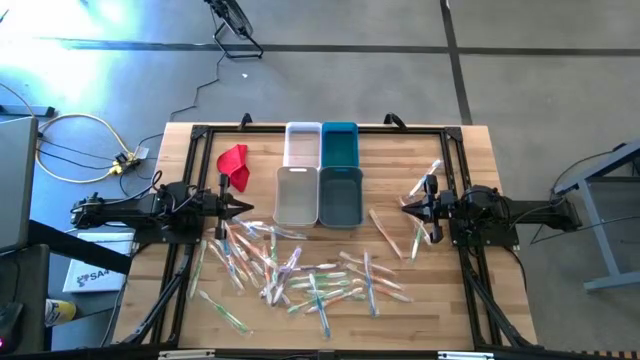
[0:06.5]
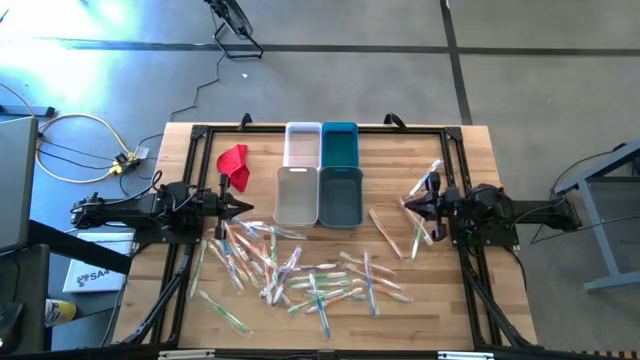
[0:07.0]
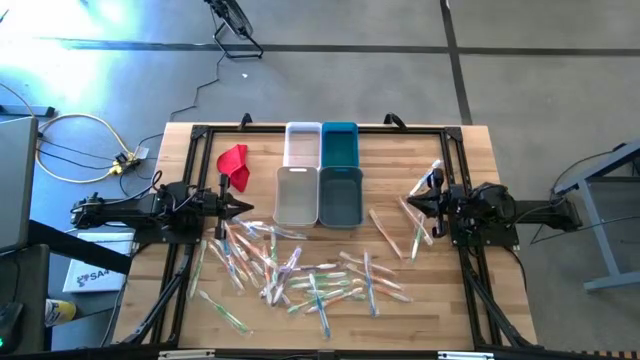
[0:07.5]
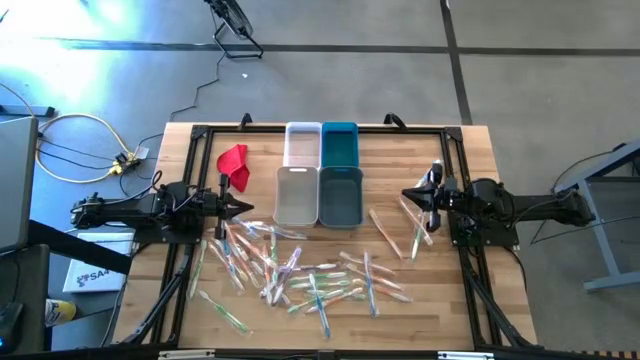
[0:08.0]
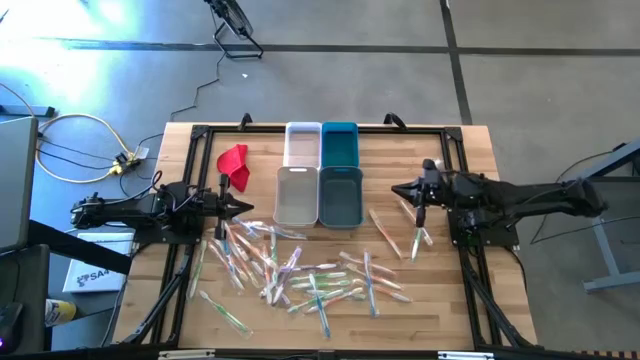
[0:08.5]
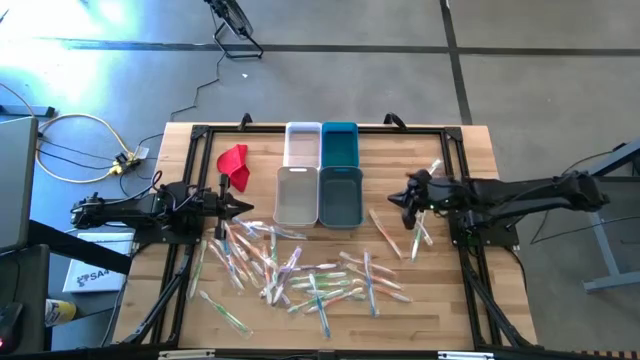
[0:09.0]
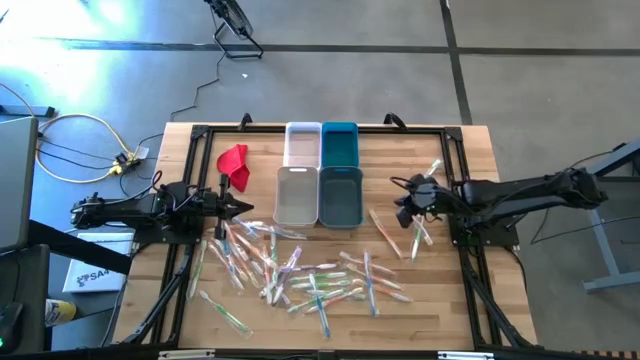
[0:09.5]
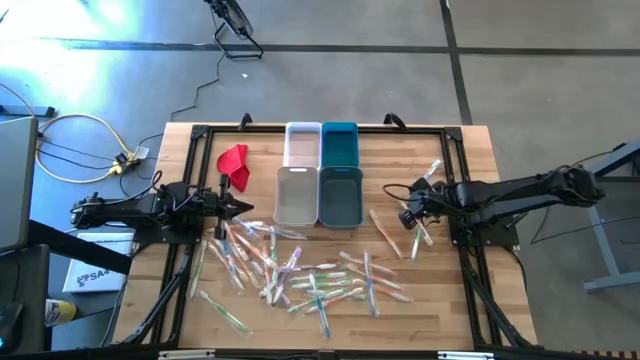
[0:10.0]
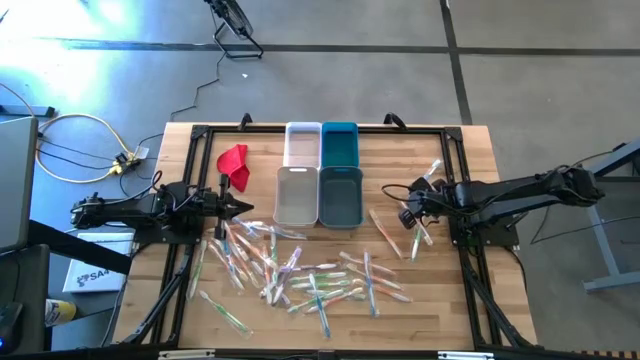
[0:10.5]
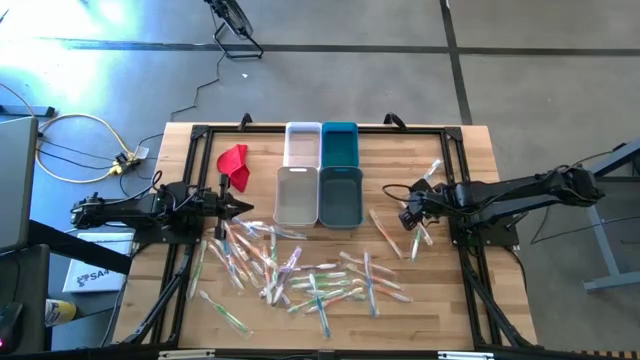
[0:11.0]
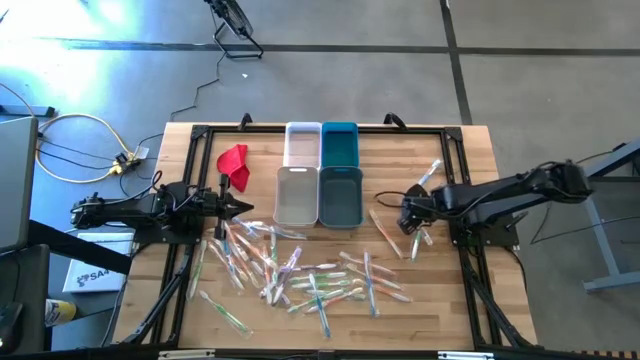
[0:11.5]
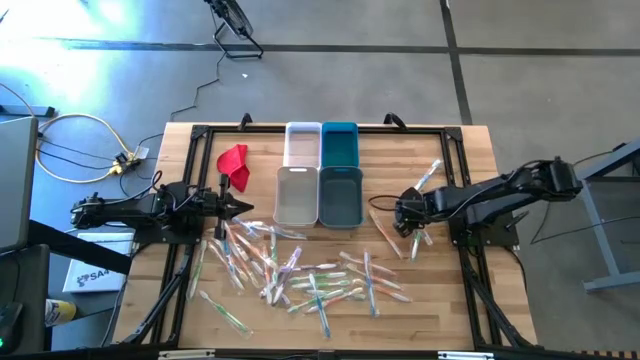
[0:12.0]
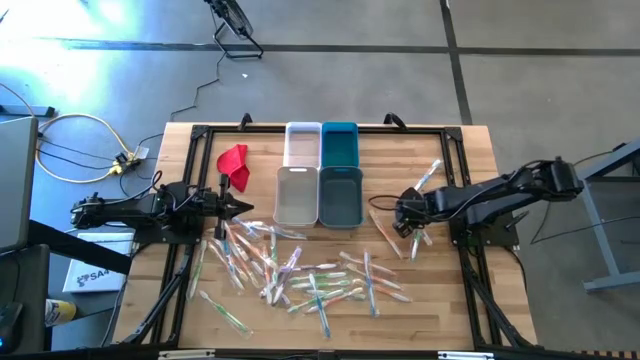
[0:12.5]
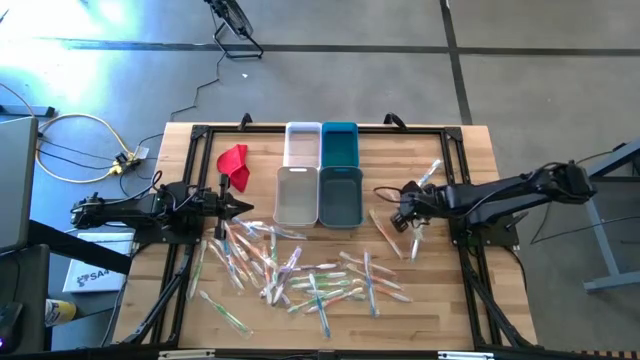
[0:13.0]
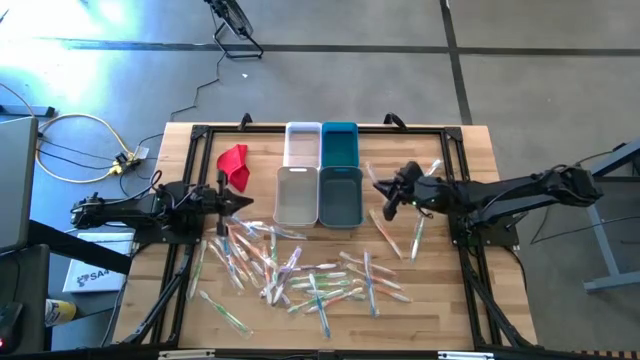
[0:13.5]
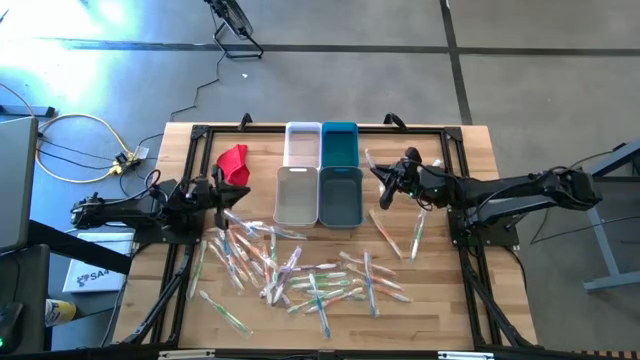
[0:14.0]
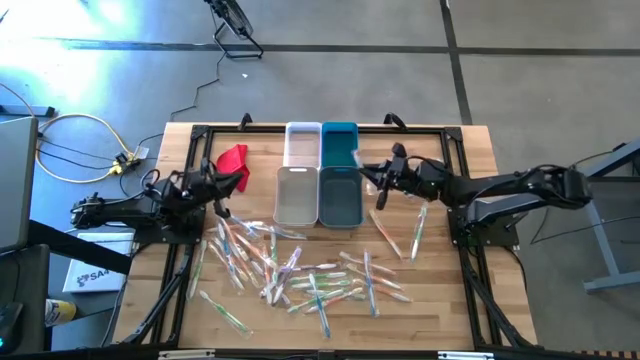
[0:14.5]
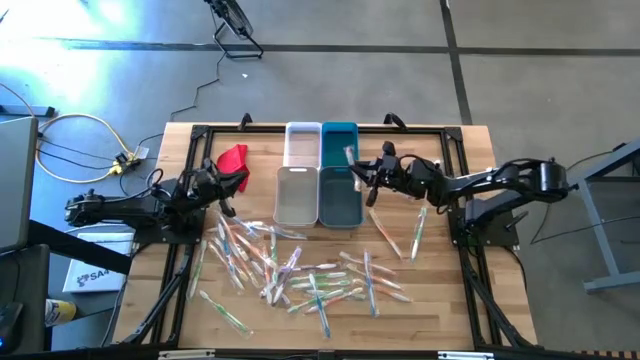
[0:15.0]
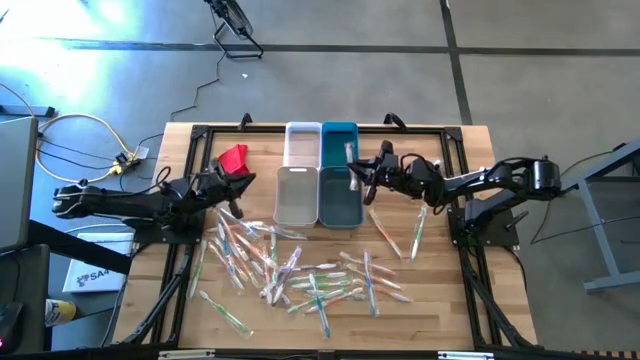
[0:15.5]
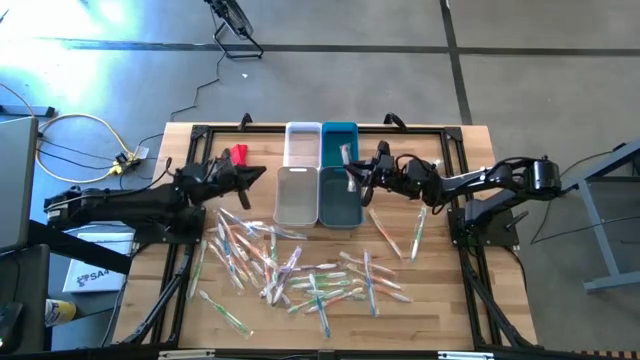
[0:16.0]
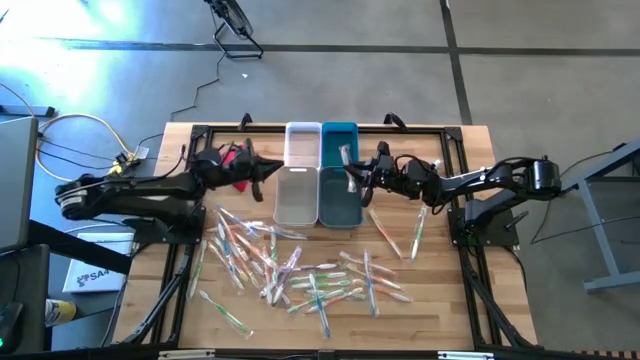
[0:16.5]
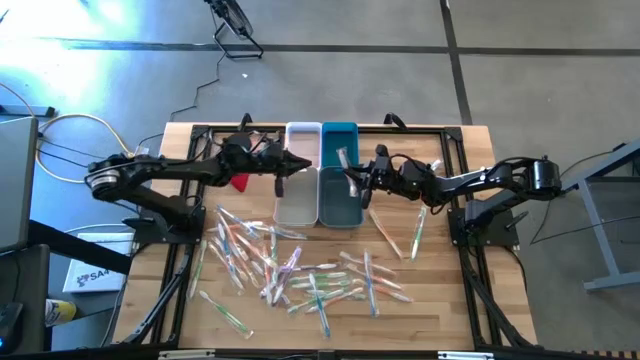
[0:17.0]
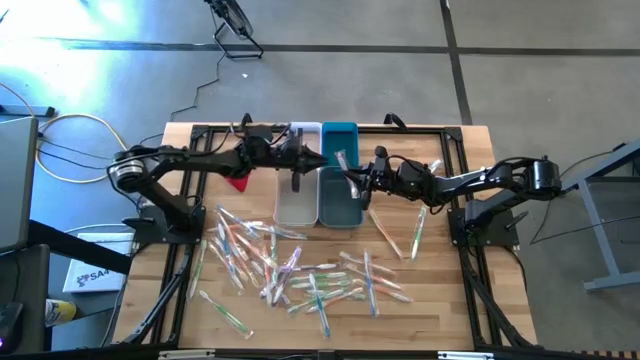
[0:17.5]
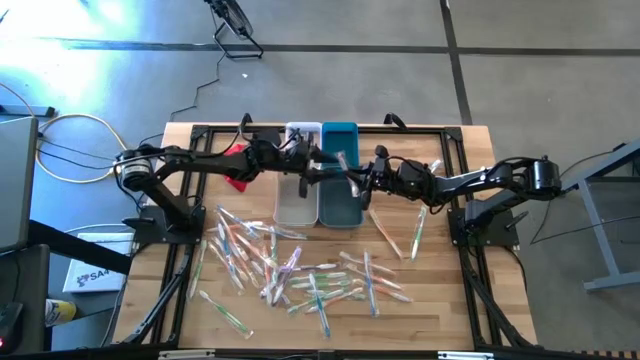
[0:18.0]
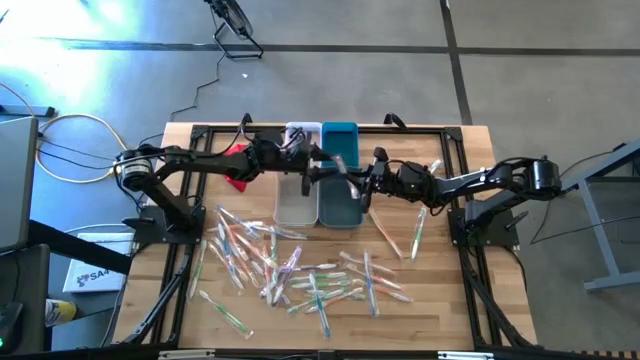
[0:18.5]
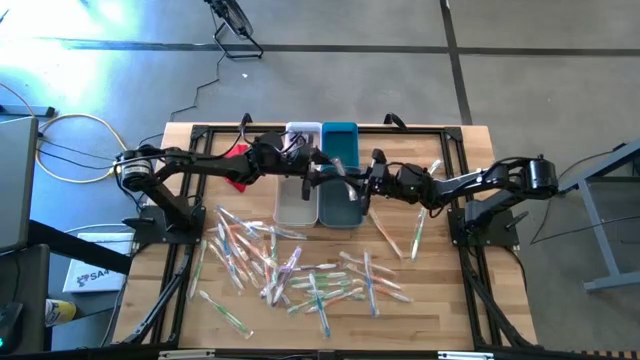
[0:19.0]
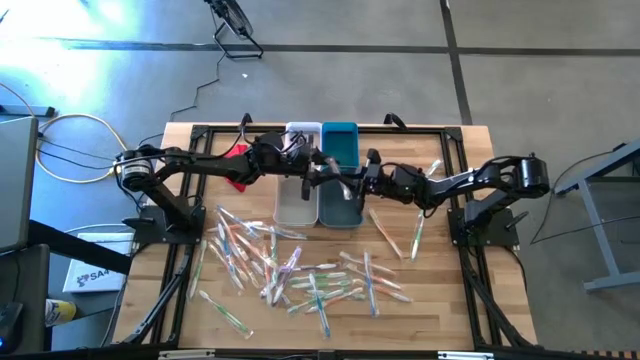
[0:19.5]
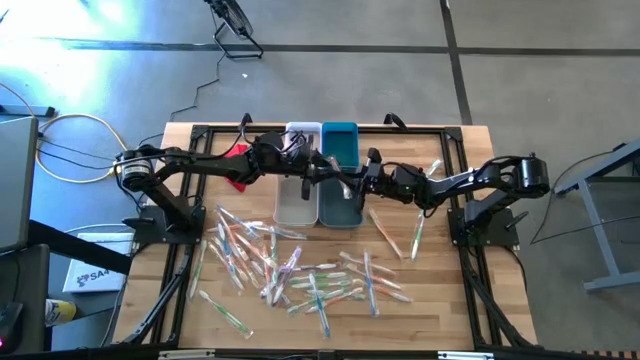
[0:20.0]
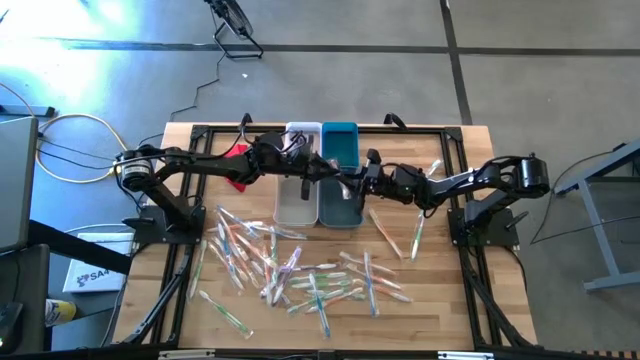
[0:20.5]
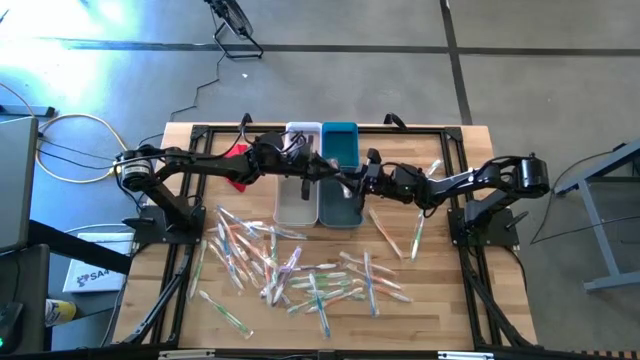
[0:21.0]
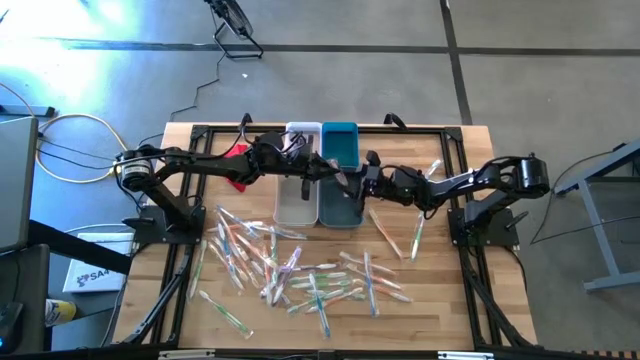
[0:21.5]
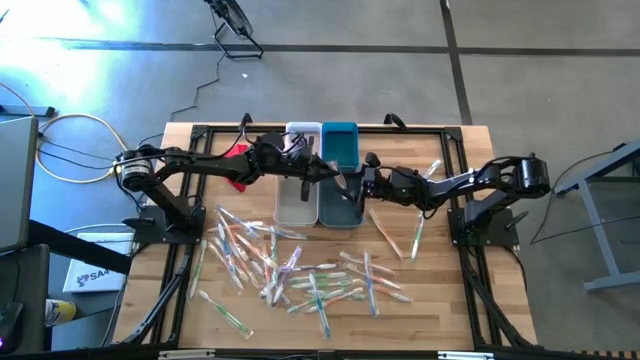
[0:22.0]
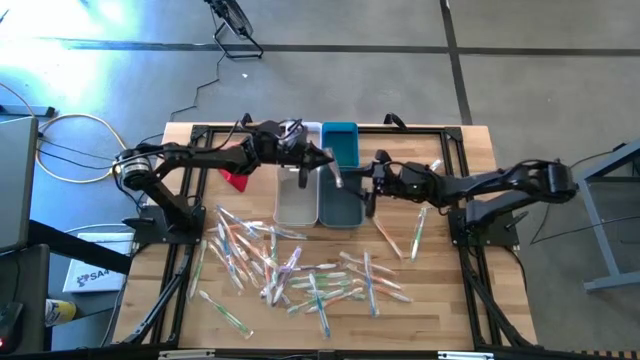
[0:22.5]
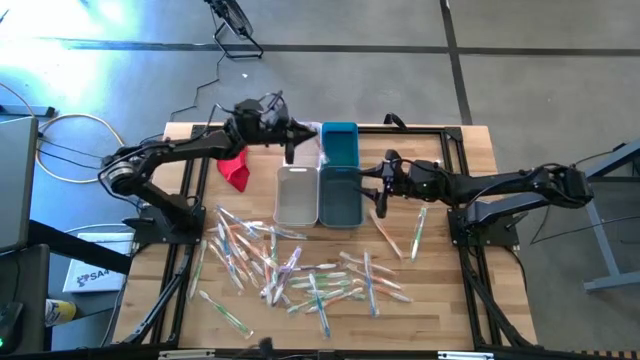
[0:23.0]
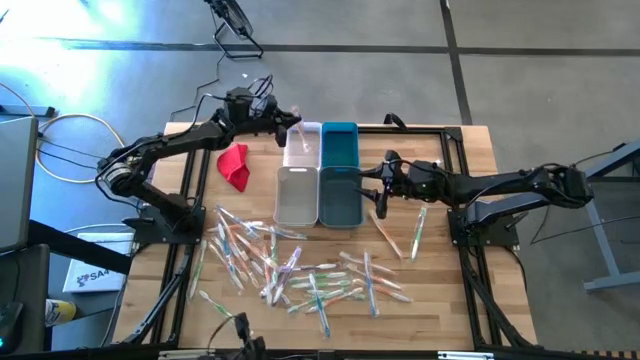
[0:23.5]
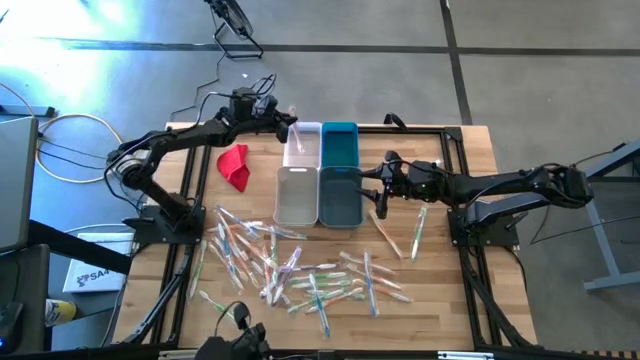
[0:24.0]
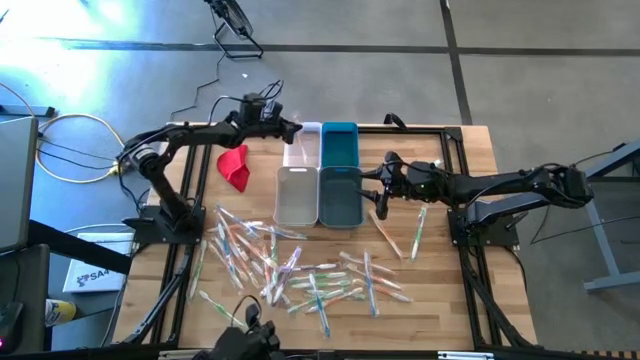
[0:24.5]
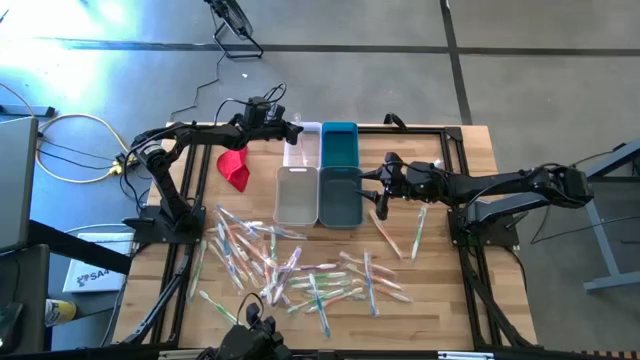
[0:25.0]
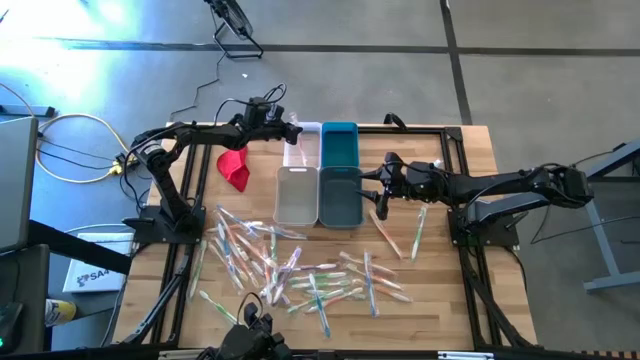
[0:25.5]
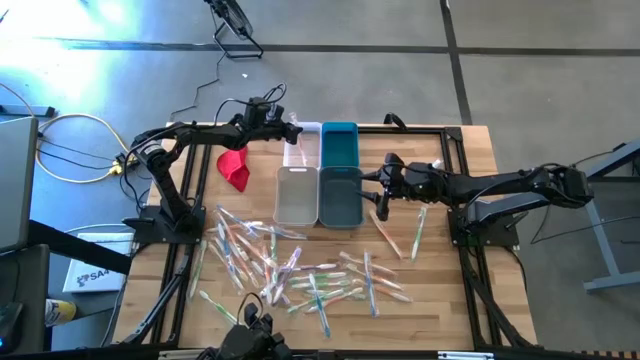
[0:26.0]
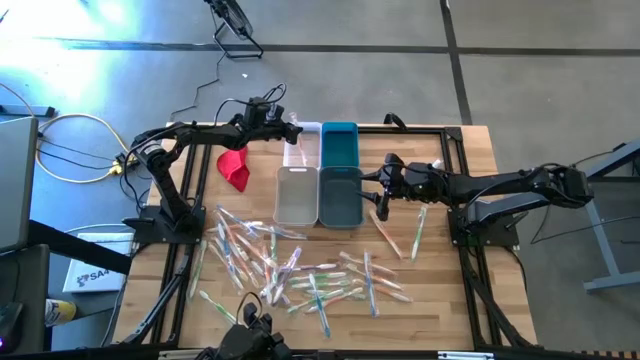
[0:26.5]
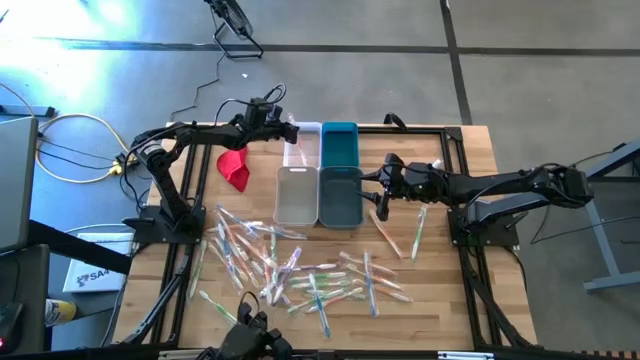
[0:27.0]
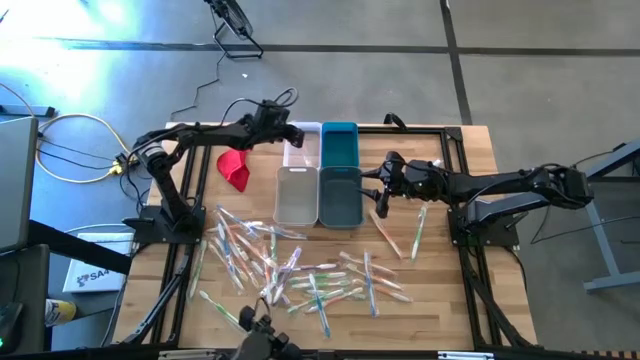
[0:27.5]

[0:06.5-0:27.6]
Task: Pick & Place Toothbrushes
Put the orange toothbrush into the transparent bin
